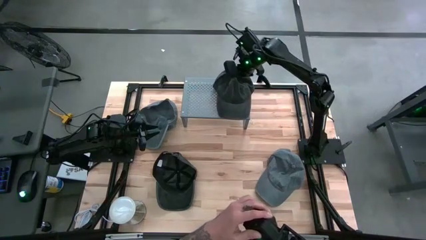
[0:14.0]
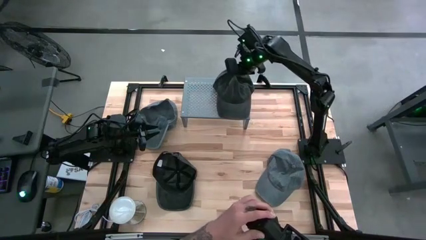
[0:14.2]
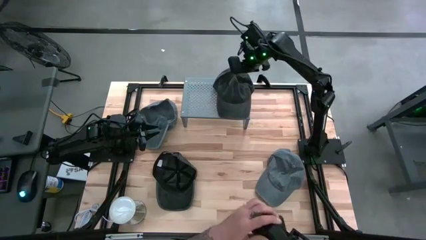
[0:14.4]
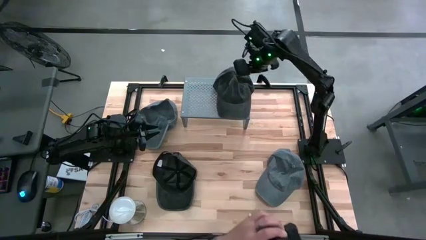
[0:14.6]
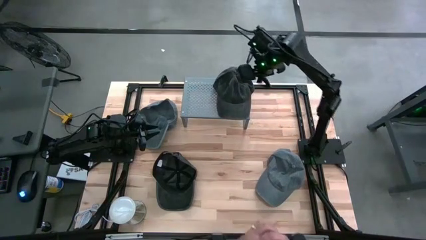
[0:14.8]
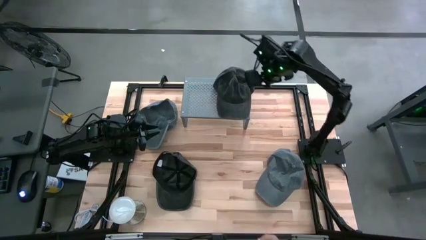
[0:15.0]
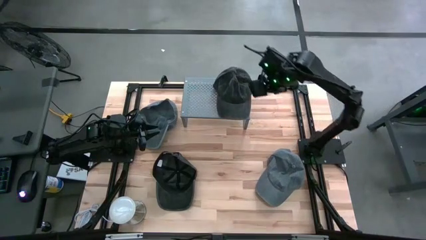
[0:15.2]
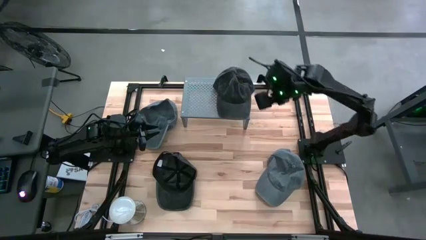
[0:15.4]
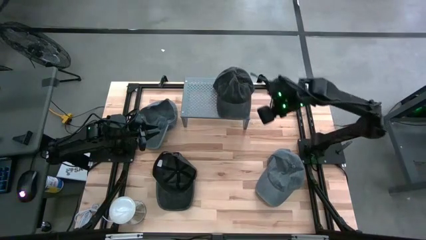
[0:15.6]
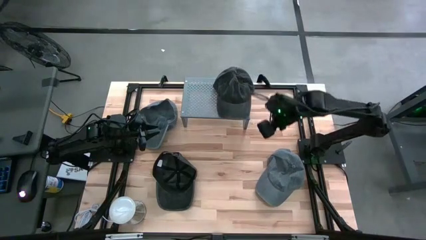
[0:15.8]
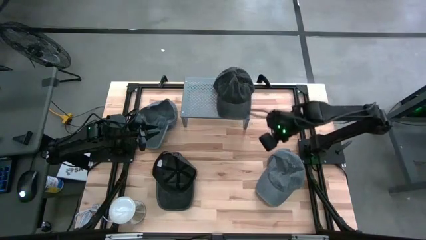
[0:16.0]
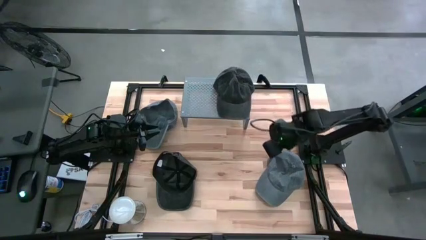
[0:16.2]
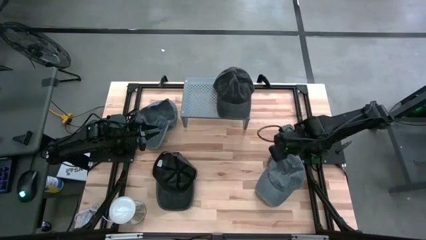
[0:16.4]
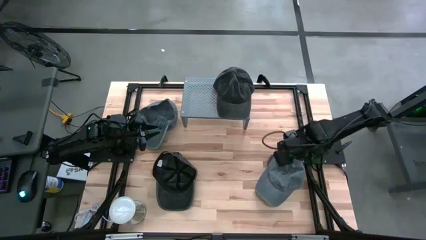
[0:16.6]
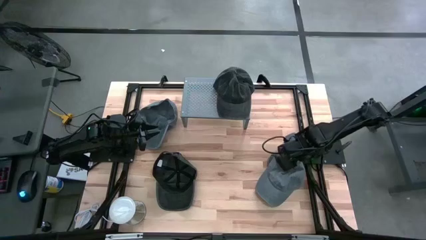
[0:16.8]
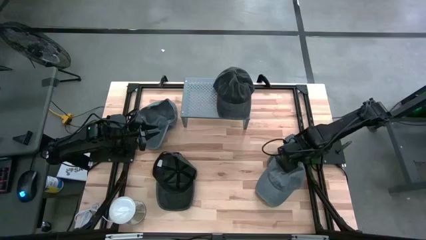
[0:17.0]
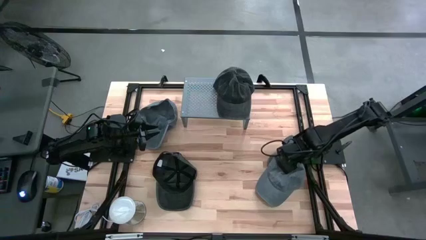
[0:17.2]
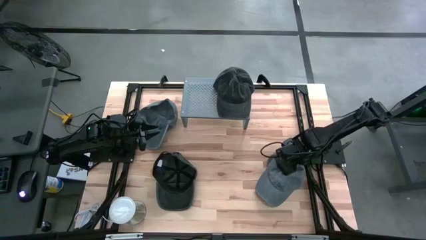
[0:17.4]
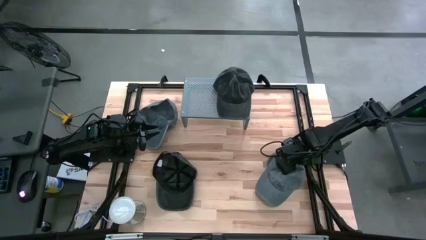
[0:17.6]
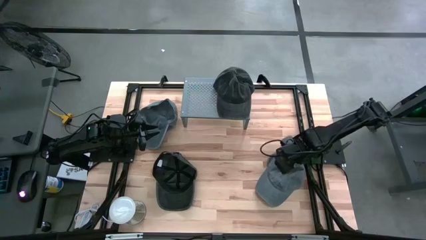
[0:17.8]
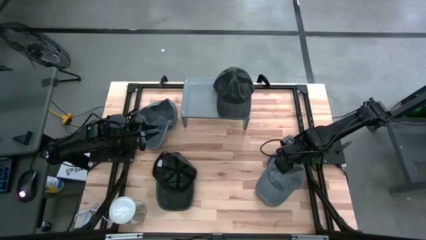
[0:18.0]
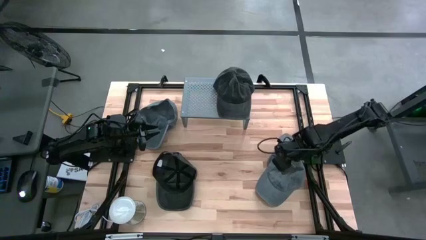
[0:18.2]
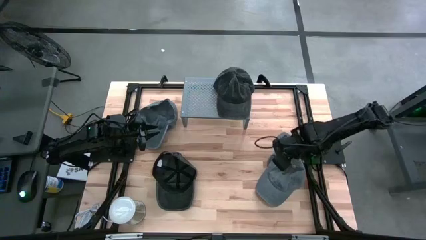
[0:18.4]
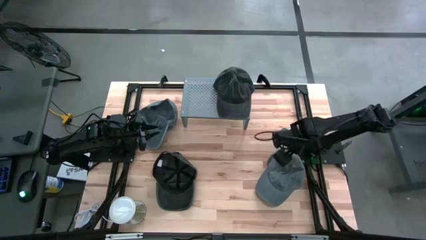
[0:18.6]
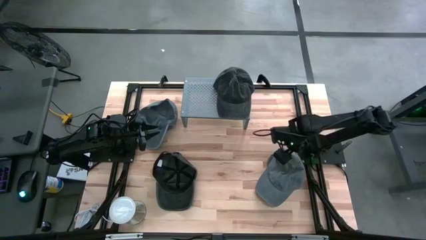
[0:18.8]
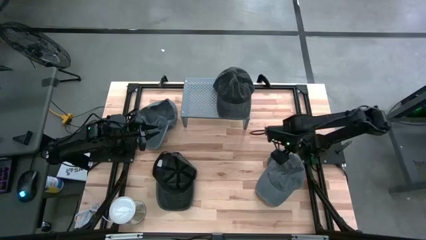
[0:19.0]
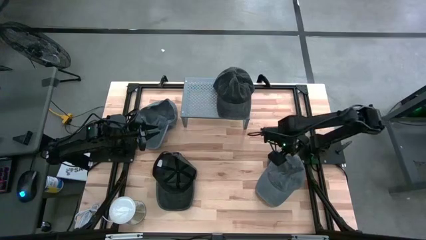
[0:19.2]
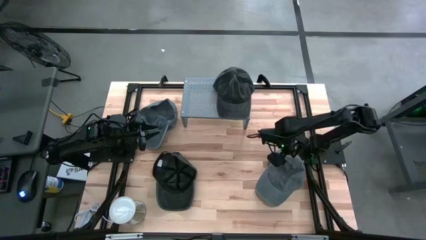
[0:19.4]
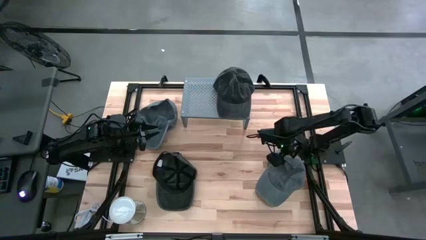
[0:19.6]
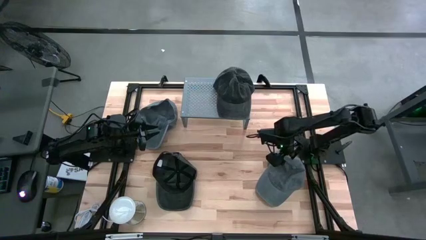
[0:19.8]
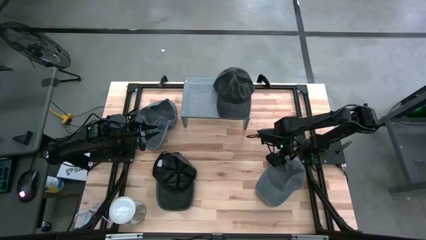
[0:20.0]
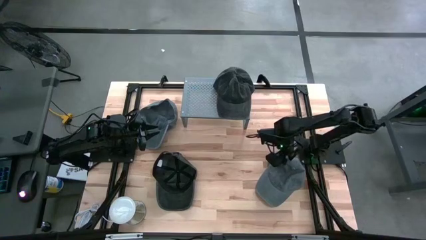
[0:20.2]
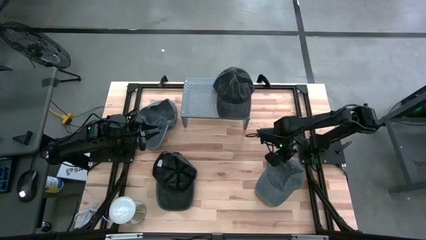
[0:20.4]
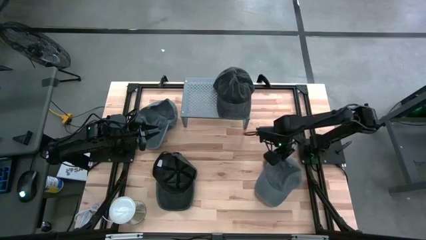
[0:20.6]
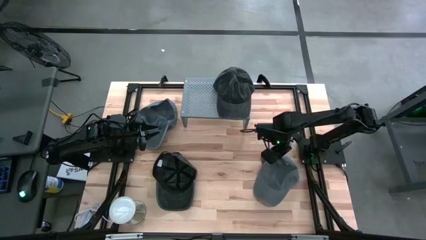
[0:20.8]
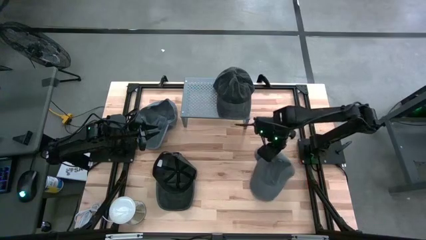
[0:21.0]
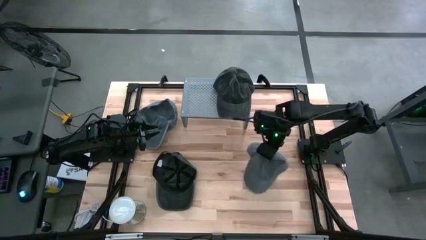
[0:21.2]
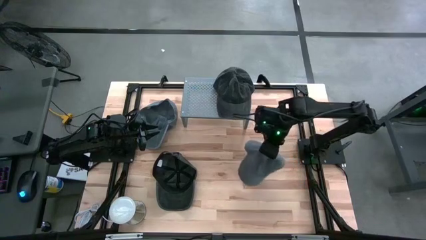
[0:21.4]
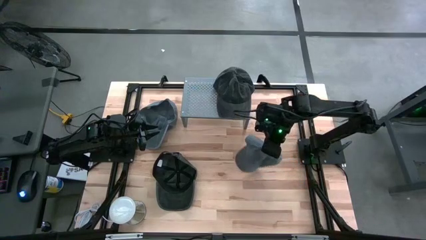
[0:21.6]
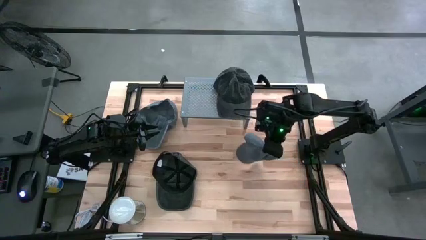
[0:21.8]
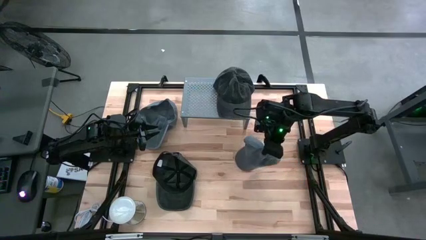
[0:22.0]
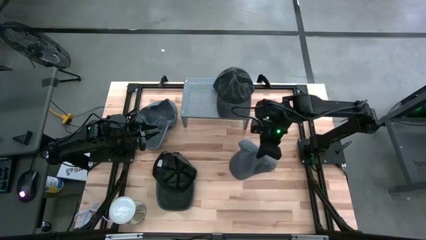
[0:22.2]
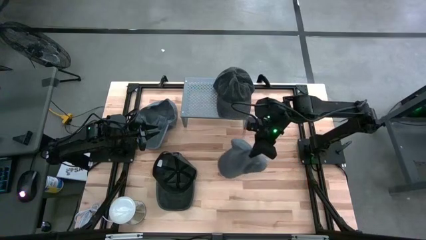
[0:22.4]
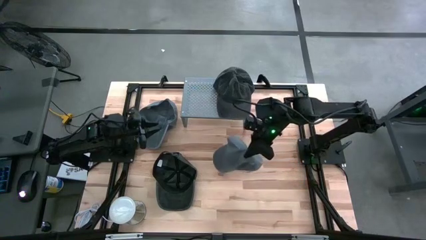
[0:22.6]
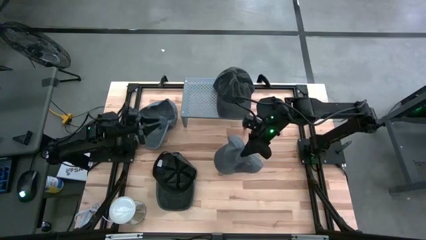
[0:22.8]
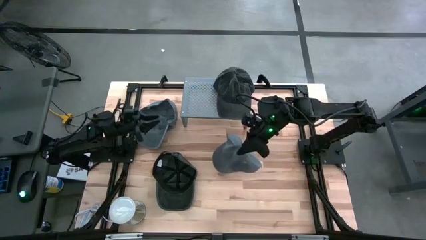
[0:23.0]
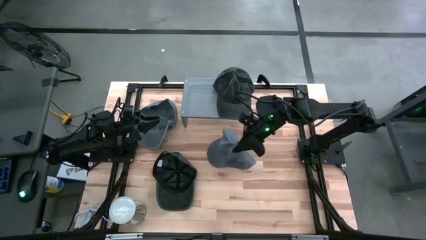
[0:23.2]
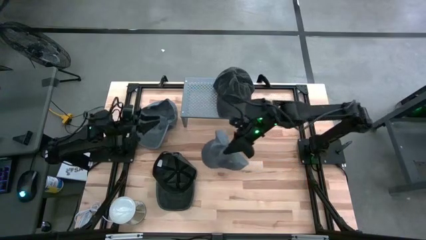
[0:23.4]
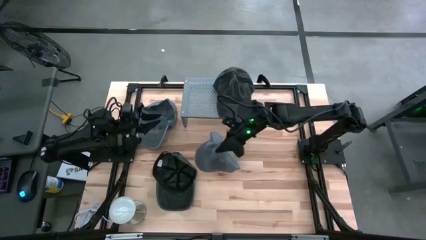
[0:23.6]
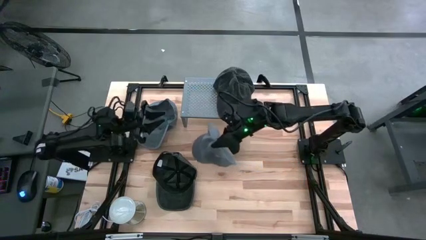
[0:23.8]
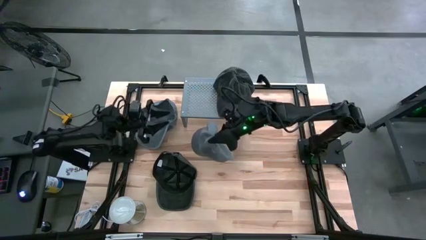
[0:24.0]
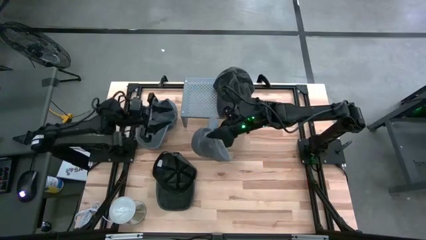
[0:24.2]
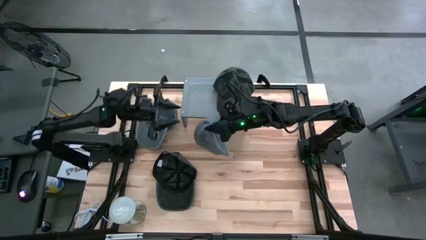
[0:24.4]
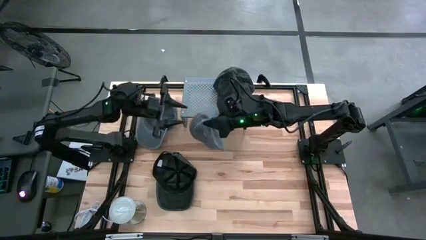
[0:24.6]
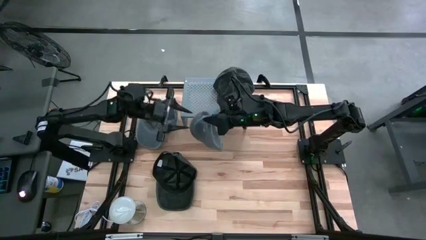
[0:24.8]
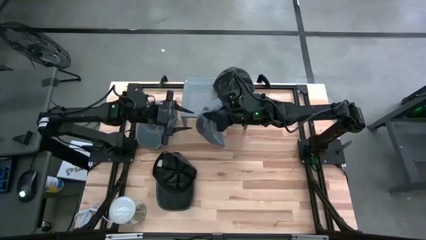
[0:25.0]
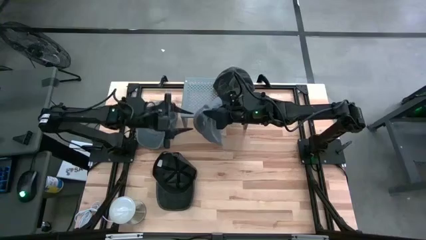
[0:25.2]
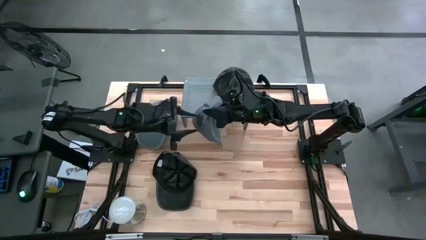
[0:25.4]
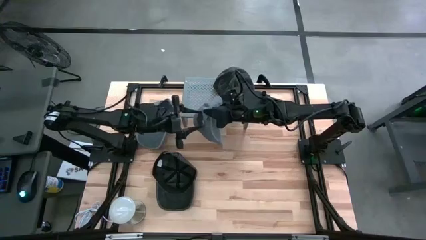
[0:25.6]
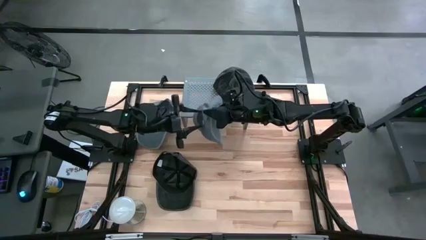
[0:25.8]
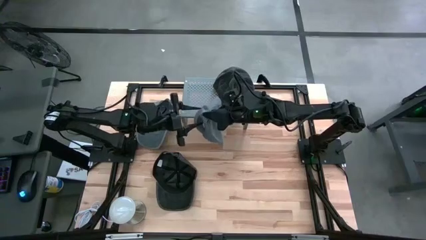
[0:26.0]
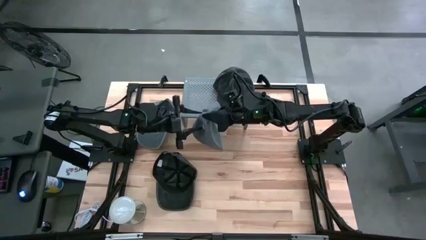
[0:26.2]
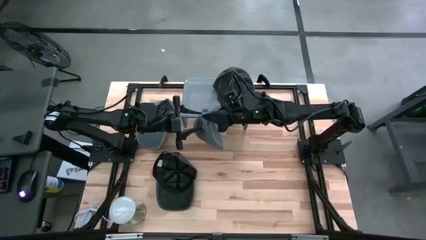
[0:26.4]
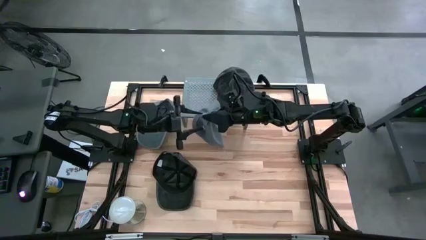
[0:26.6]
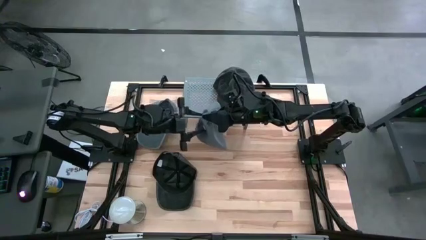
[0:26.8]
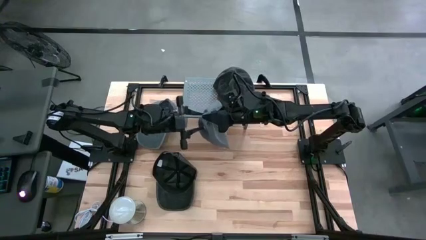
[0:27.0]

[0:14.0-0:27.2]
Task: Pick & Place hat
Put the right gray cap on the shelf

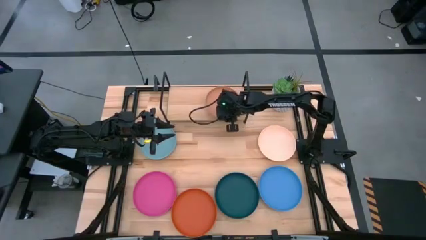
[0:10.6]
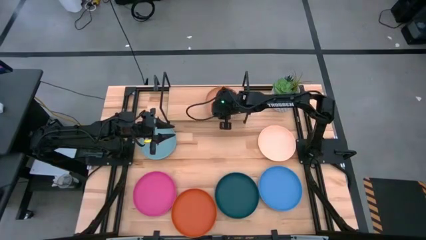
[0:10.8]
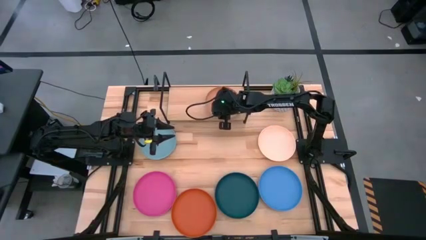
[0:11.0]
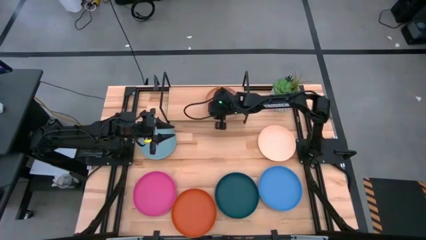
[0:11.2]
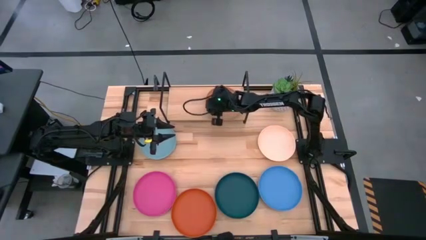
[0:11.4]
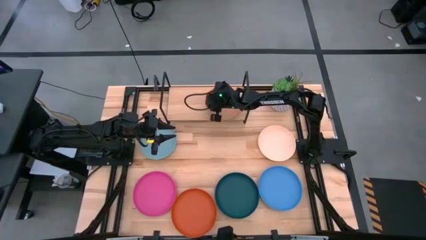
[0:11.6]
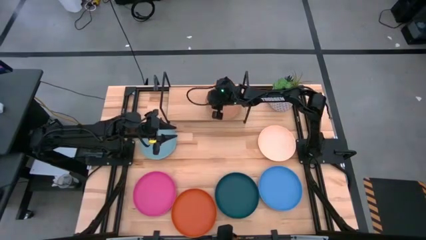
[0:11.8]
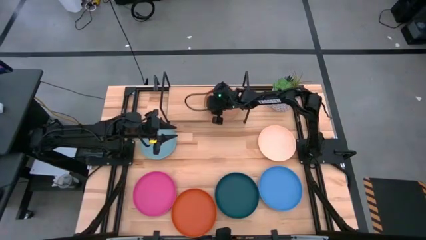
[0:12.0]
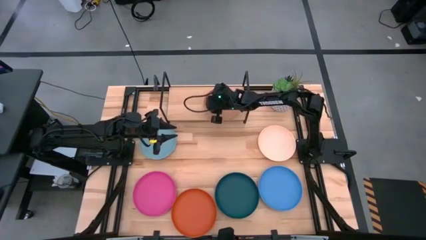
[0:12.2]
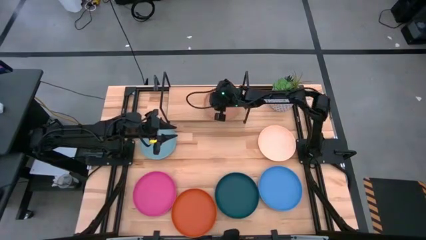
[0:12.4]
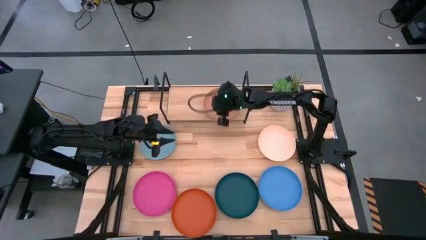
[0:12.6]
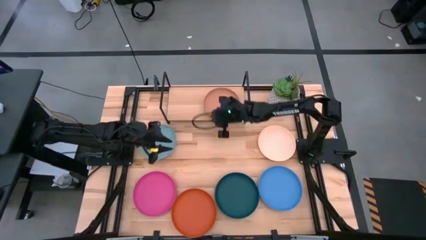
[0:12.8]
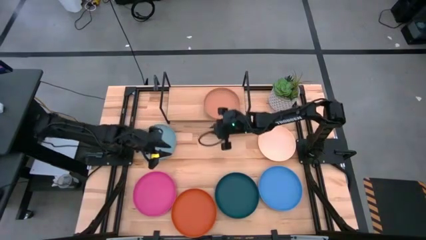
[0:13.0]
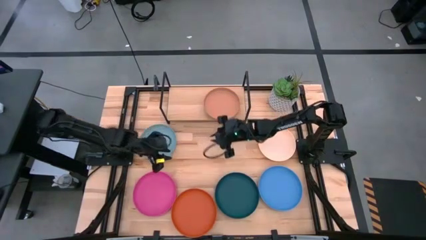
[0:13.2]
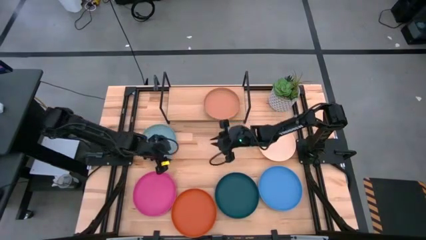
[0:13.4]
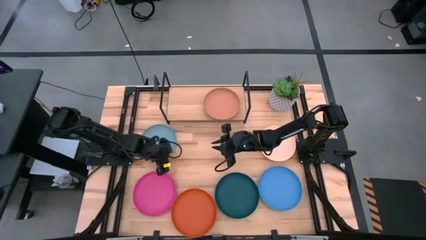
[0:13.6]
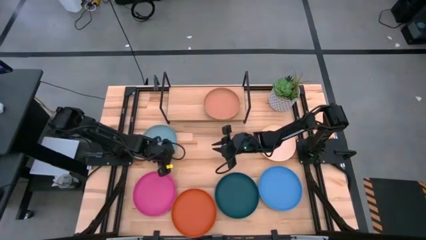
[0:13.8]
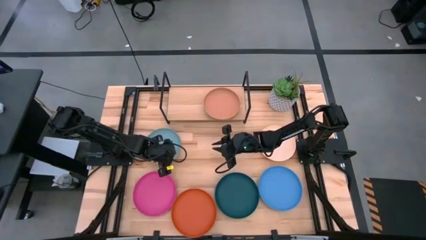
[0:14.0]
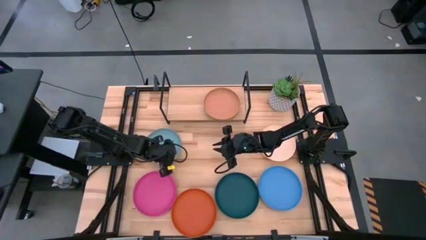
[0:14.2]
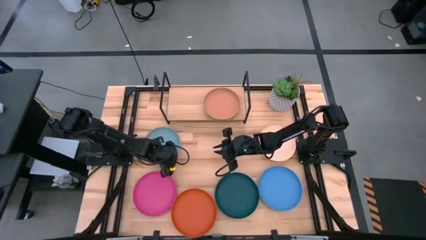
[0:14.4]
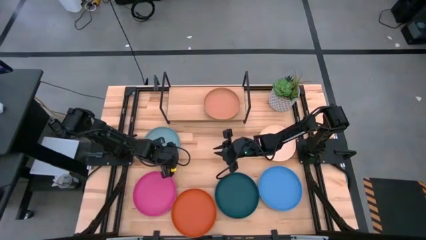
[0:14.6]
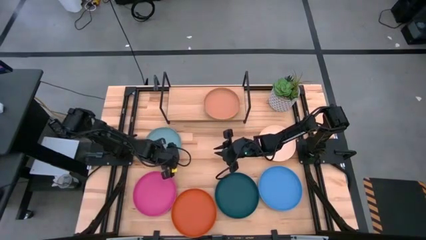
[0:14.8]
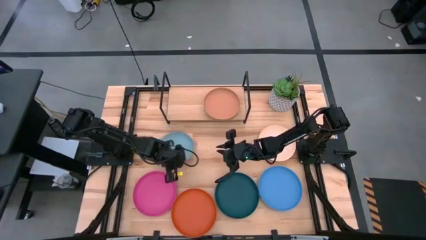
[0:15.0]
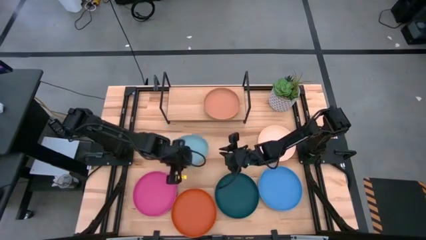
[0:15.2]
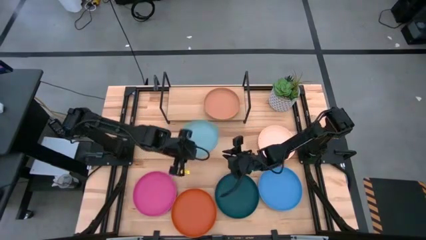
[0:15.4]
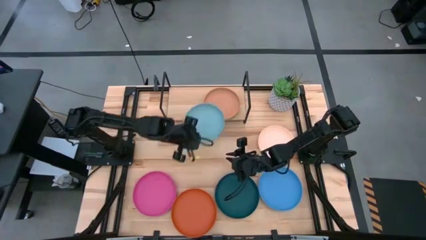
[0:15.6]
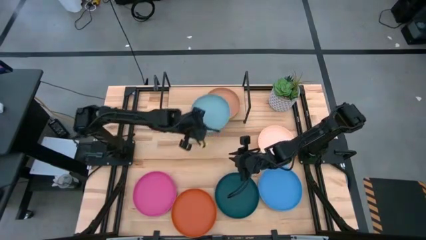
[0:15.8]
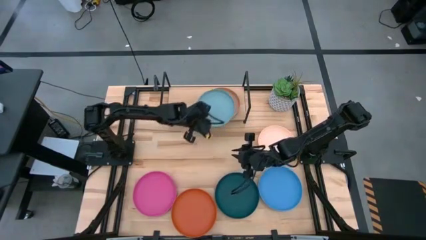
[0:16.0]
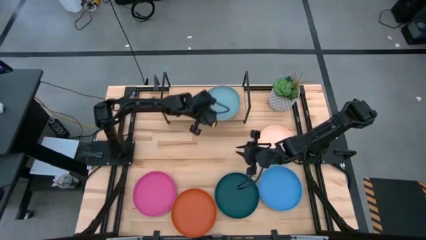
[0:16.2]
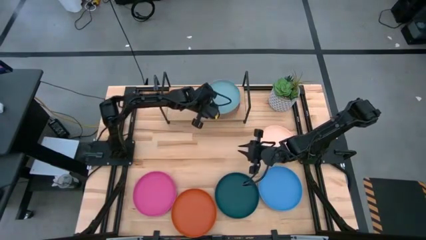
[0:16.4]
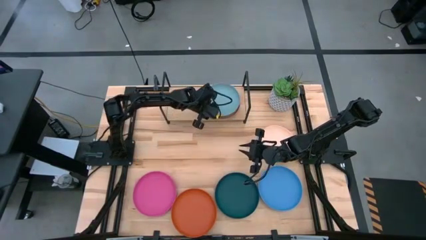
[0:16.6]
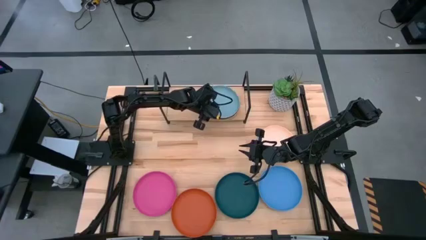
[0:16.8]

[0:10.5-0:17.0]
Task: Place and stack plates onto a shelf
Stack the light blue plate on top of the light orange plate
